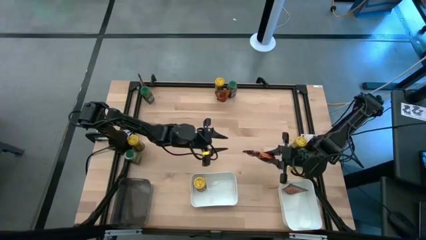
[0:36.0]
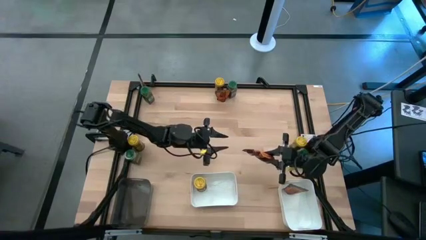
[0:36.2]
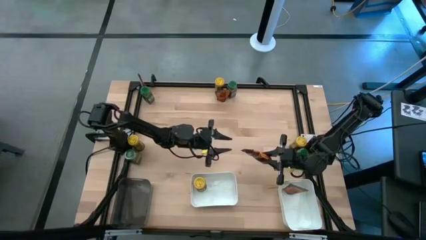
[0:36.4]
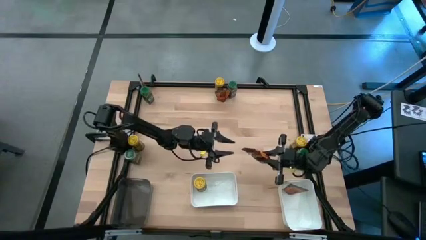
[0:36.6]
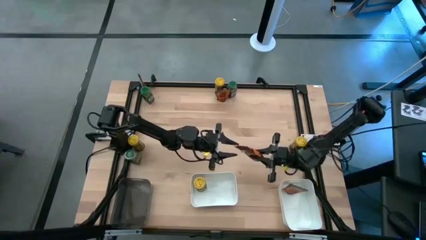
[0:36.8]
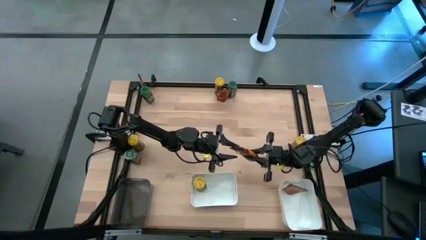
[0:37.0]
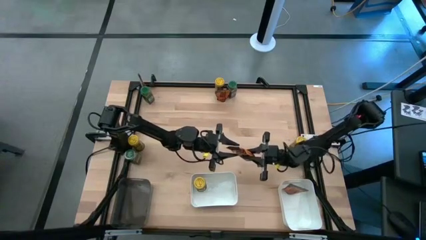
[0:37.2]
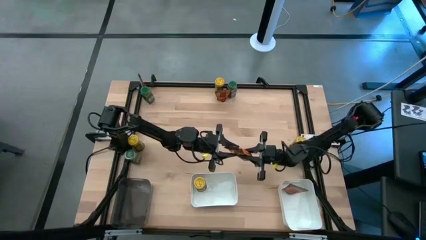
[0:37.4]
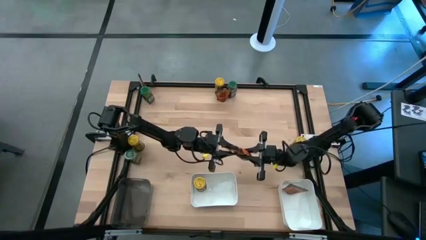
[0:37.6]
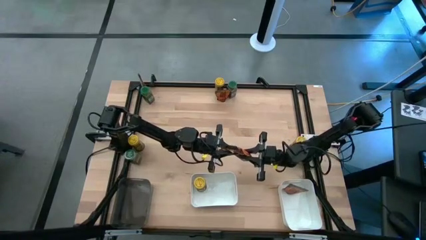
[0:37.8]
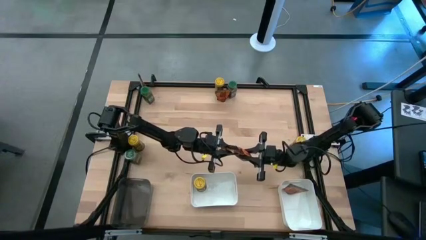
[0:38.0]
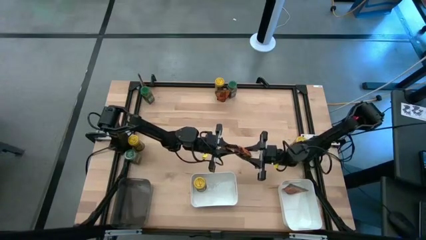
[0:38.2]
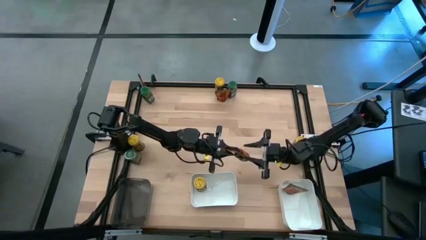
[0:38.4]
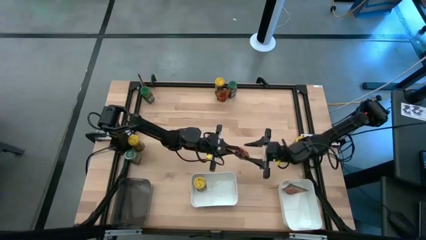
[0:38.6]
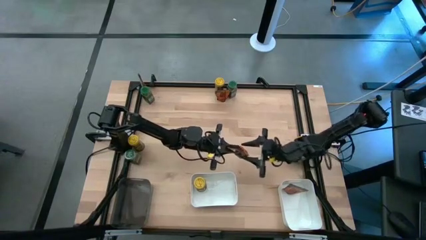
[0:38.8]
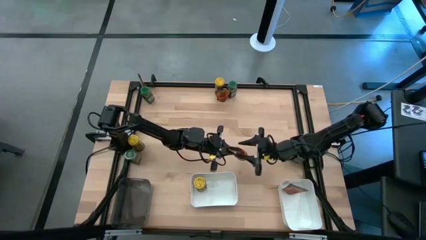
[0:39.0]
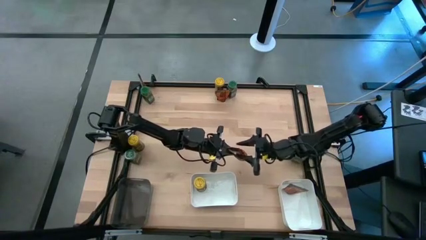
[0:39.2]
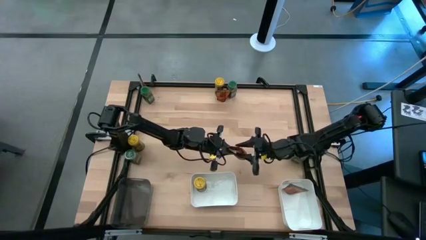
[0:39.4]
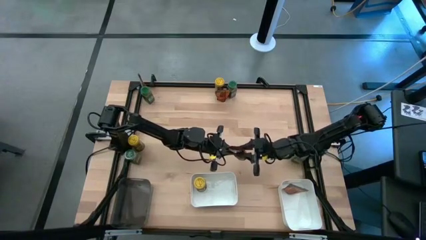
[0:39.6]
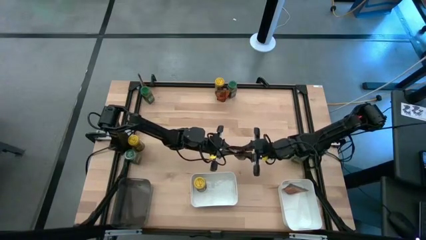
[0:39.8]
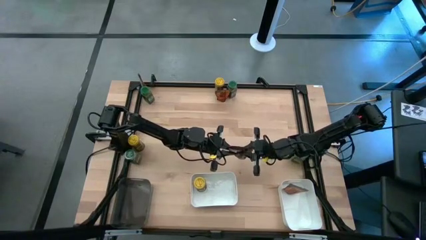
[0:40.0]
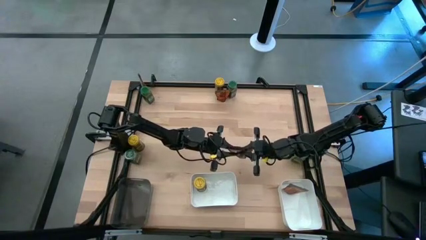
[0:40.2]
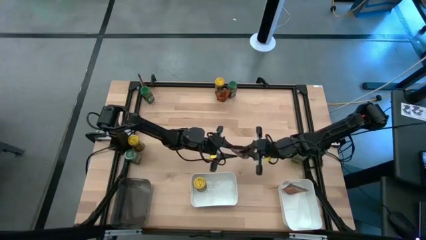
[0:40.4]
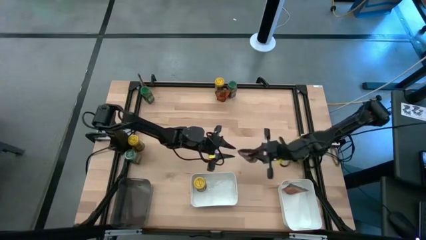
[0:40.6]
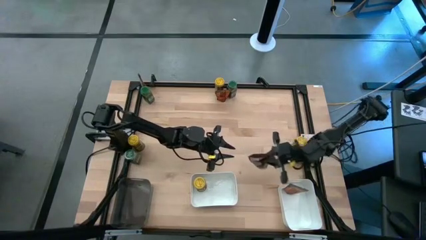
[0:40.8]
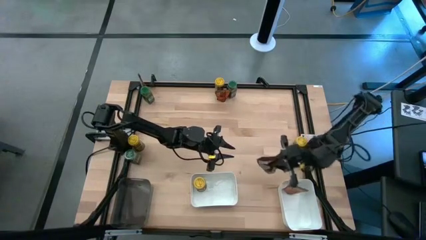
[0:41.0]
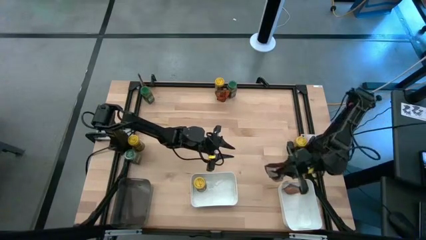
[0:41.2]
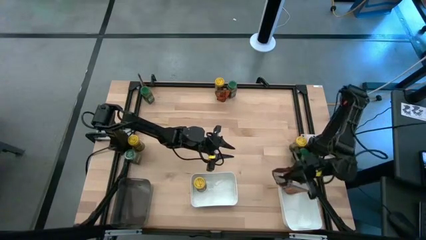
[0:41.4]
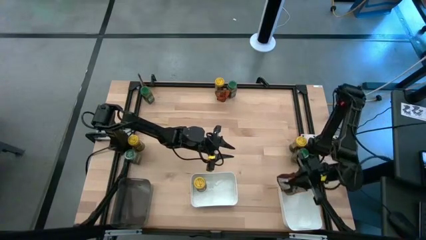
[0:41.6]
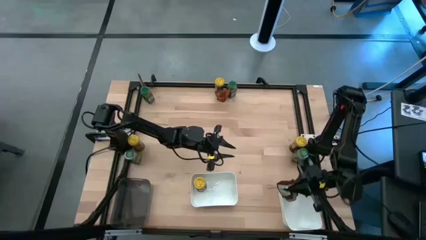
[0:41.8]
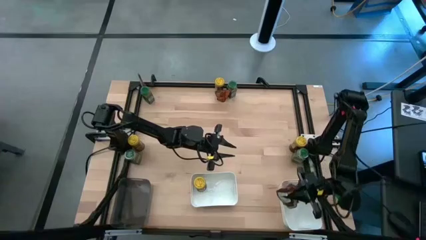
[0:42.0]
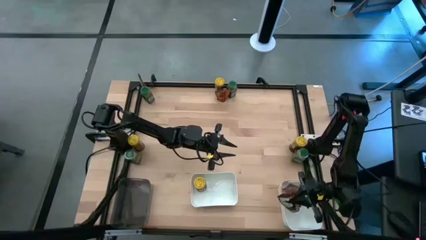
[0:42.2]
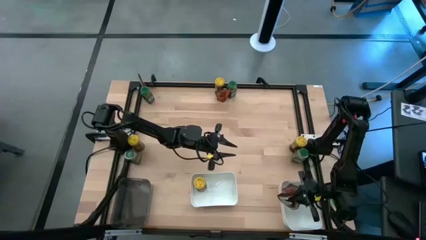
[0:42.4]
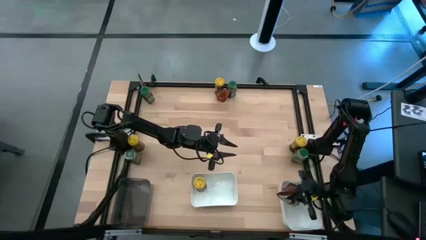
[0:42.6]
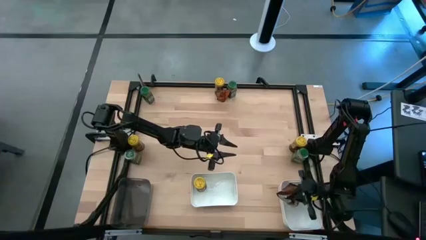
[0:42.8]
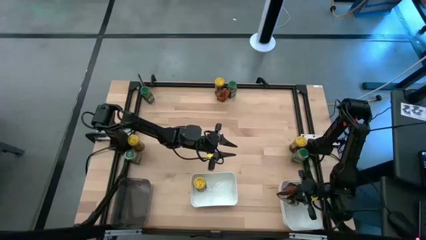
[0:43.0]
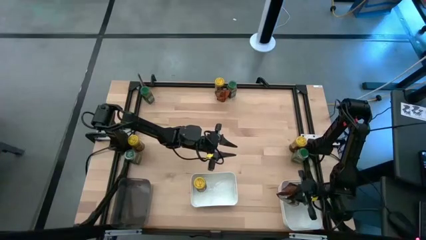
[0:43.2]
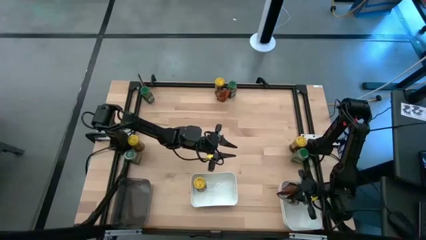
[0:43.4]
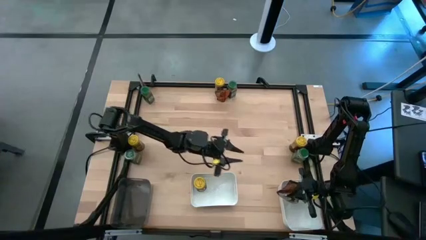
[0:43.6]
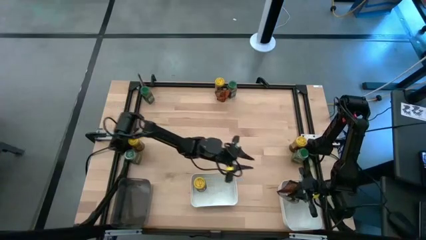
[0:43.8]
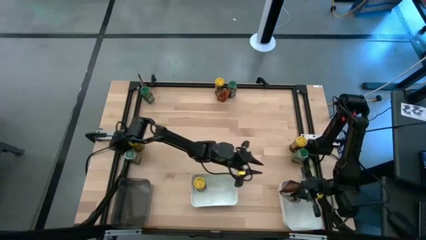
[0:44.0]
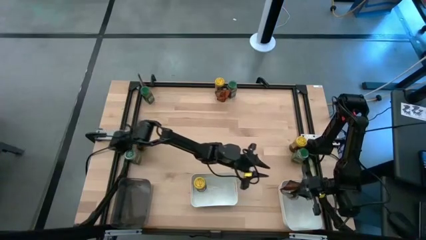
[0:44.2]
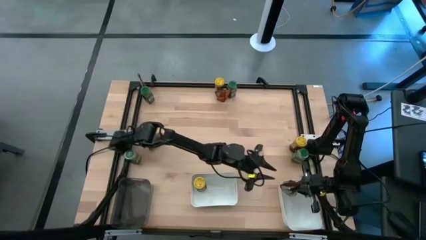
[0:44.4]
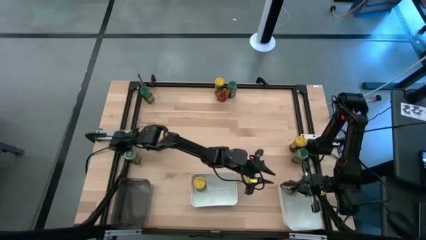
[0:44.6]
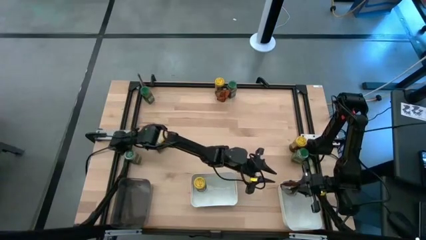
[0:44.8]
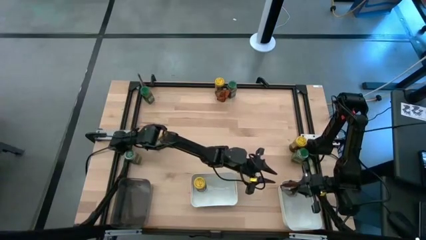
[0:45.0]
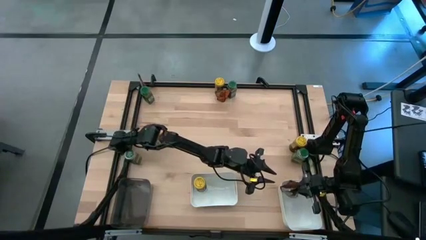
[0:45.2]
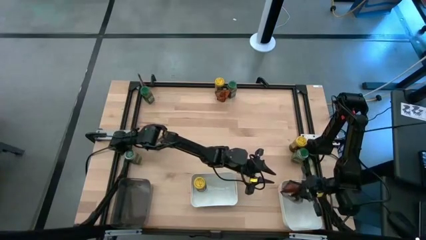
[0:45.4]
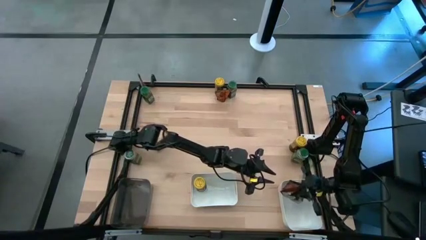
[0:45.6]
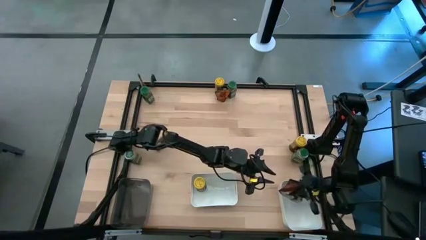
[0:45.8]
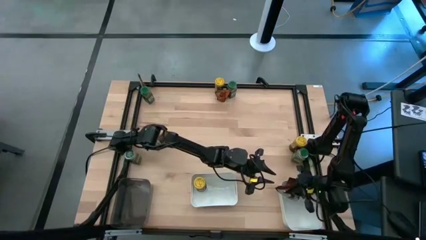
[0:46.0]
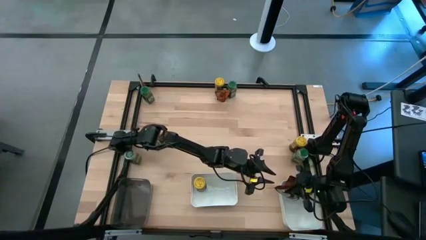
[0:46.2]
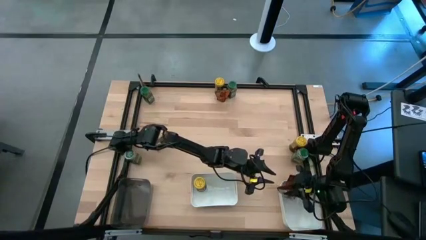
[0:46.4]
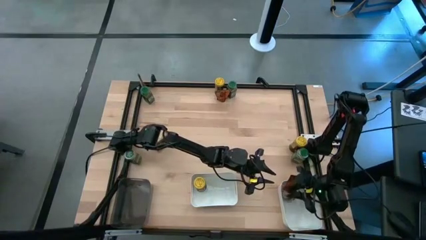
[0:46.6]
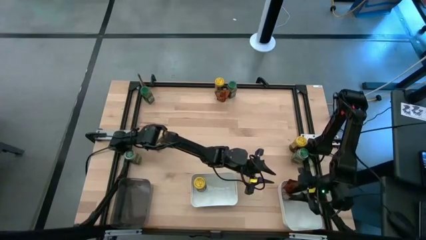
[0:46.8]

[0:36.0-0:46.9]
Task: Sort spices by type
Put the bottom left brown seasoning bag into the right white bin

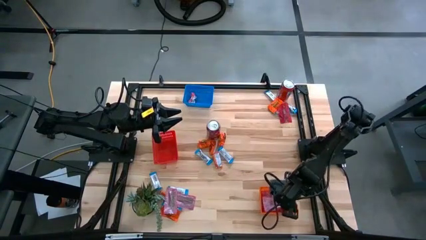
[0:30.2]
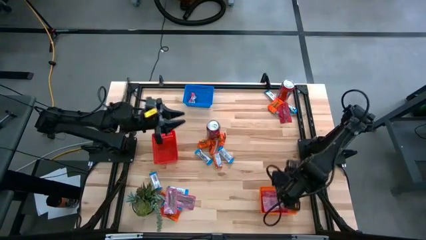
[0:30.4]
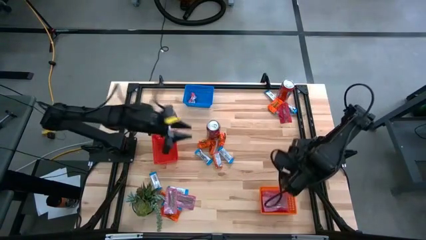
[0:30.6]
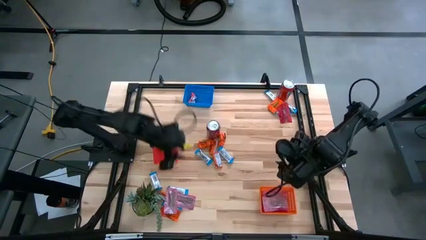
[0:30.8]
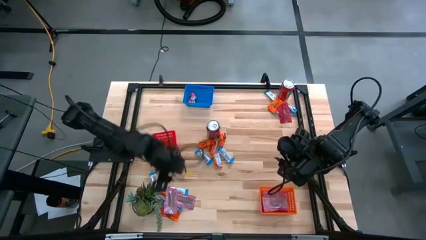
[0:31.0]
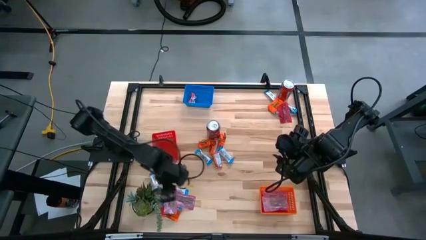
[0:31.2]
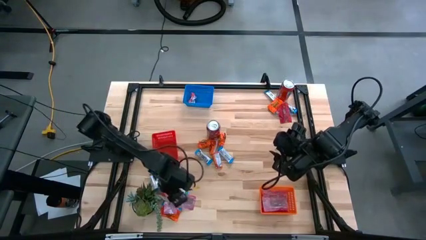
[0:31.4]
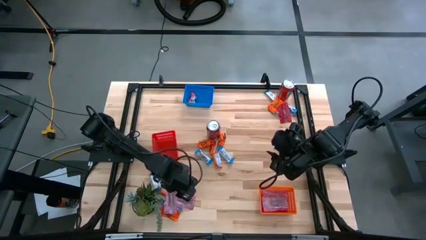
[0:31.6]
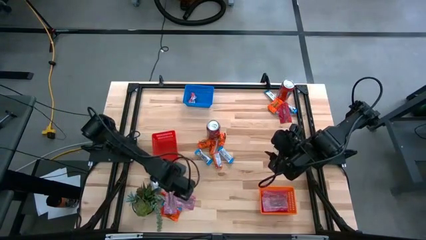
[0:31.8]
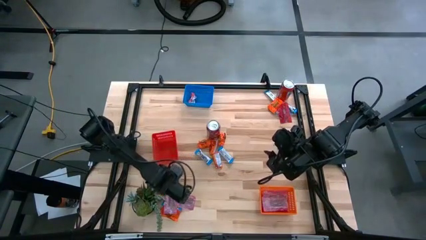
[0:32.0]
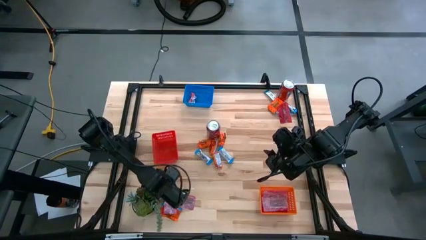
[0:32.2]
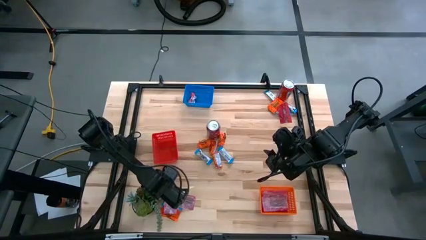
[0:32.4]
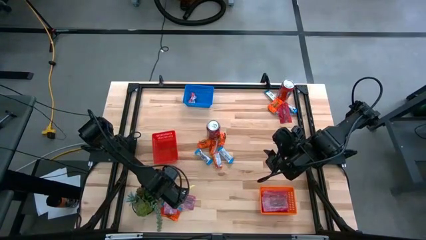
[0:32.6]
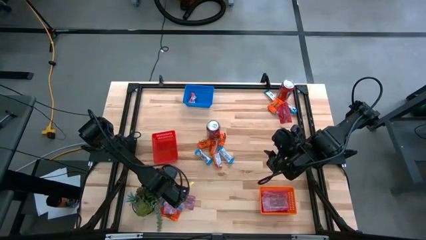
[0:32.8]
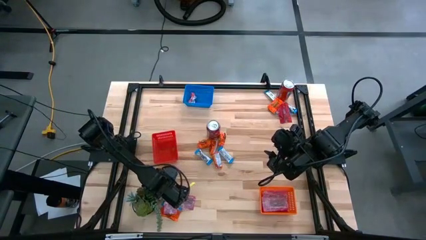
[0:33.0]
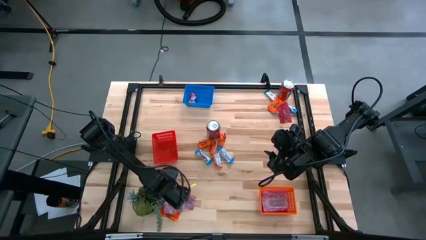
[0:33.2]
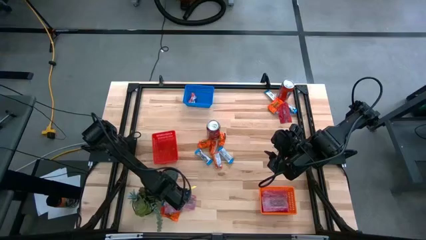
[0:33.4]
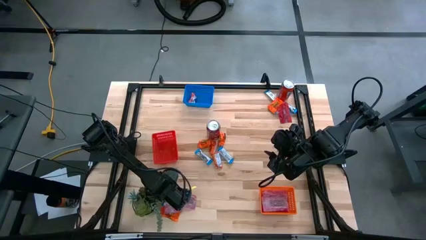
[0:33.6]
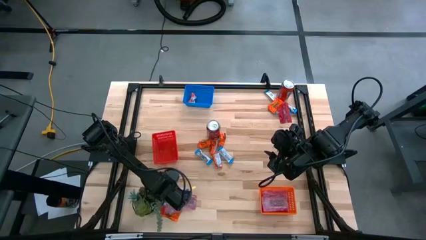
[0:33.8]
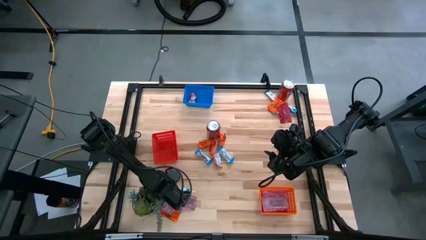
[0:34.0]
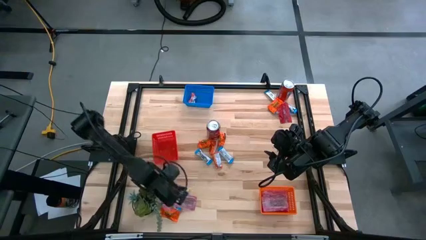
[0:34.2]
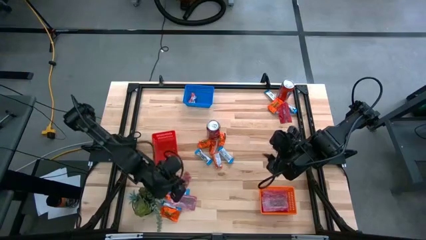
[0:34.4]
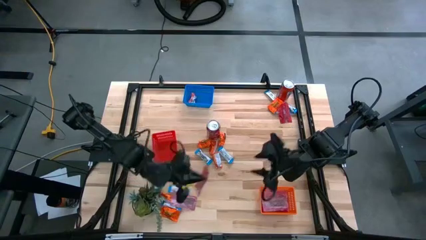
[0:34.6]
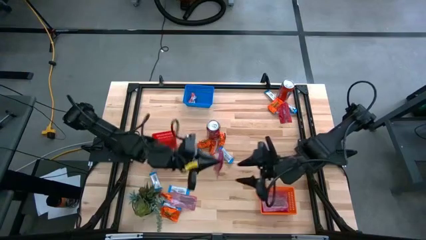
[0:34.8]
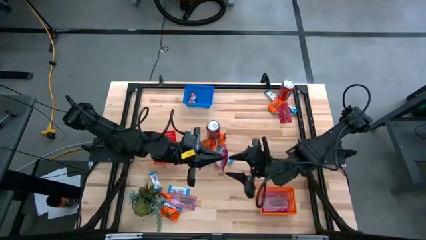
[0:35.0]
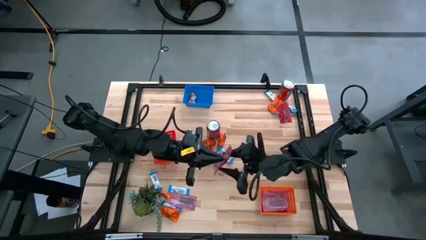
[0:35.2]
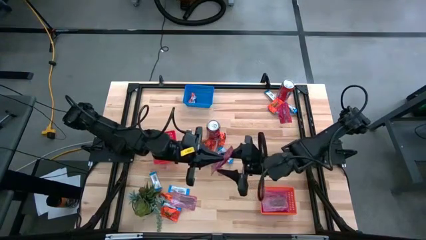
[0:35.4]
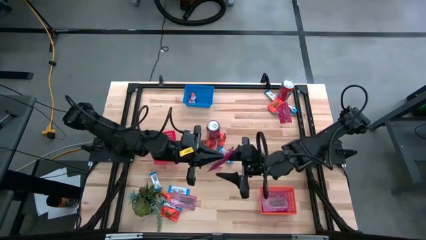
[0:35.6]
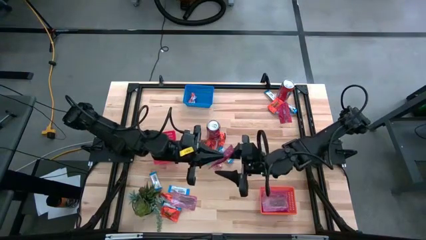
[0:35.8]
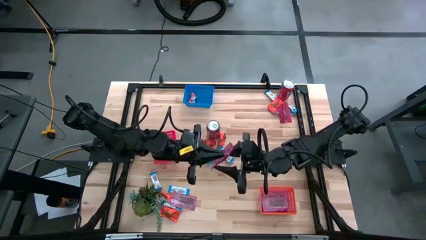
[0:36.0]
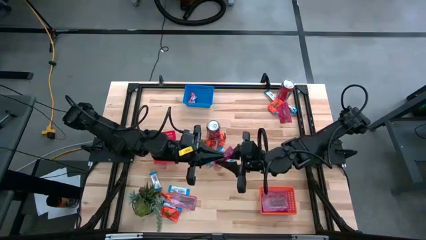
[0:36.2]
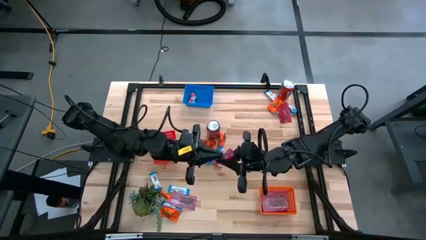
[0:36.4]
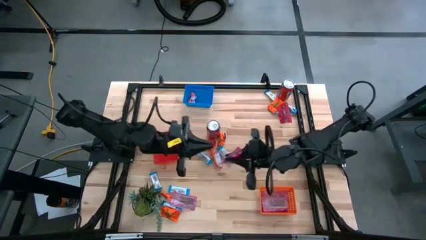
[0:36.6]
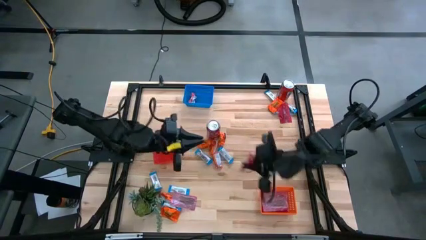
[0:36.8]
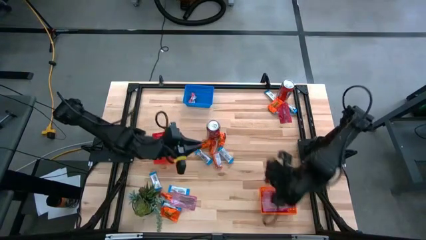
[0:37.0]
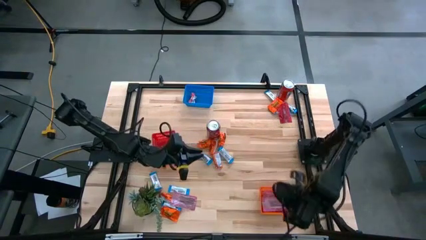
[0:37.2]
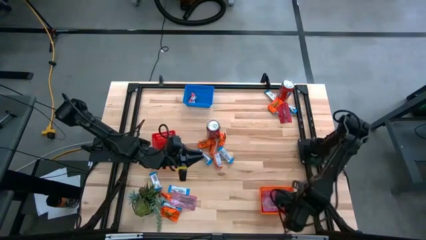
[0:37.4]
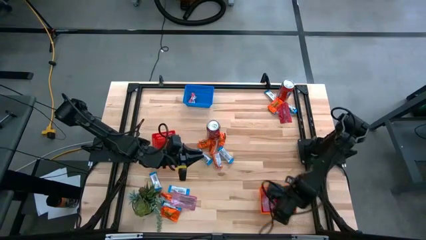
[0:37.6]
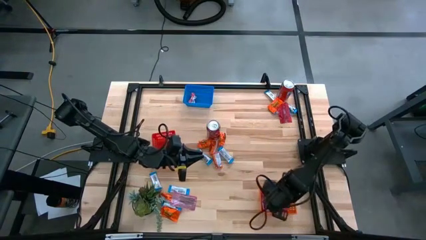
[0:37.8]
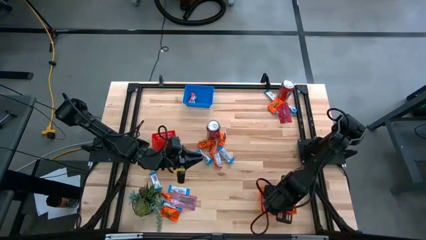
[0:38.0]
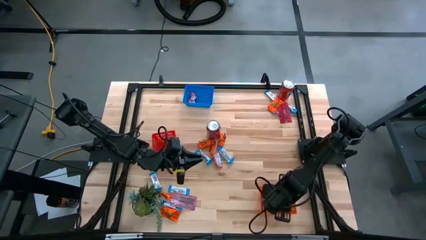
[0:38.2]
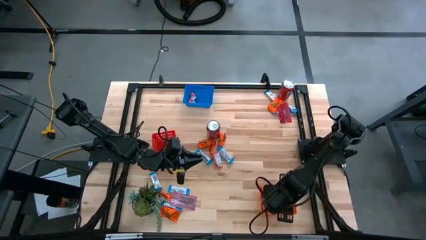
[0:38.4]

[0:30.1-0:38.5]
Task: Sort candy
Put the red candy into the orange bin
